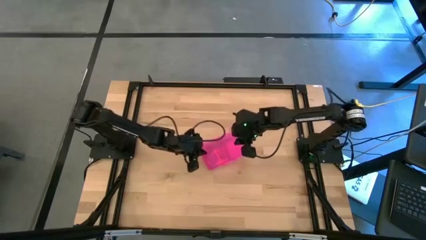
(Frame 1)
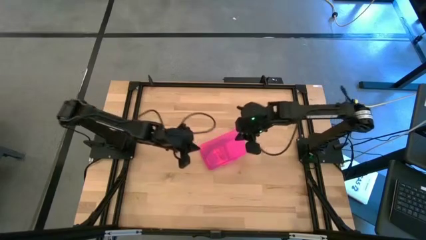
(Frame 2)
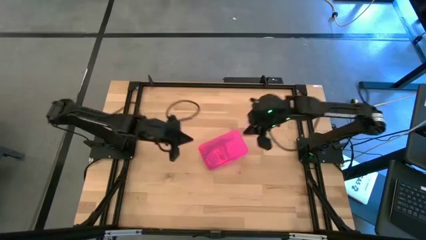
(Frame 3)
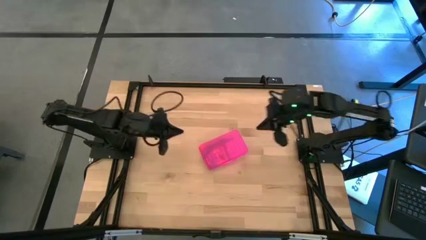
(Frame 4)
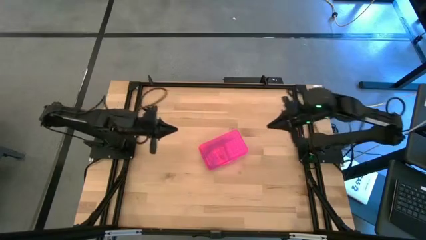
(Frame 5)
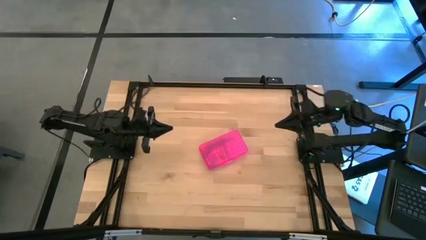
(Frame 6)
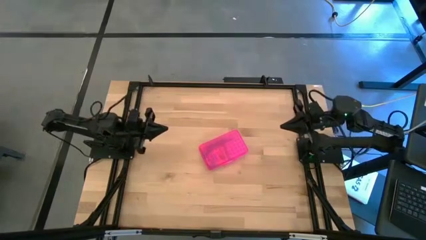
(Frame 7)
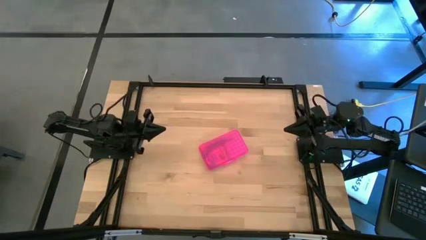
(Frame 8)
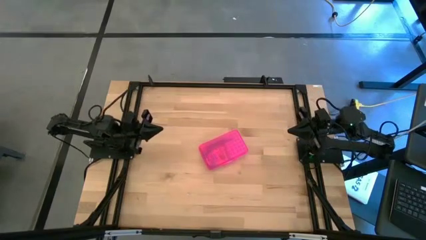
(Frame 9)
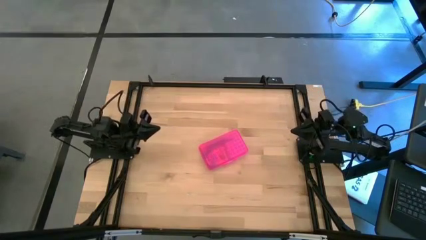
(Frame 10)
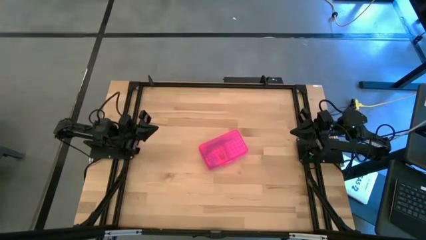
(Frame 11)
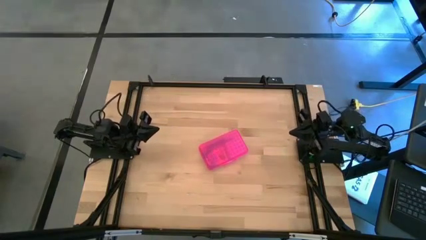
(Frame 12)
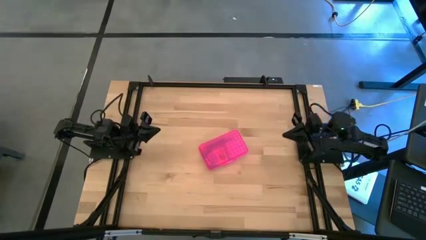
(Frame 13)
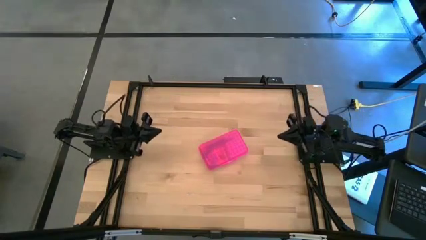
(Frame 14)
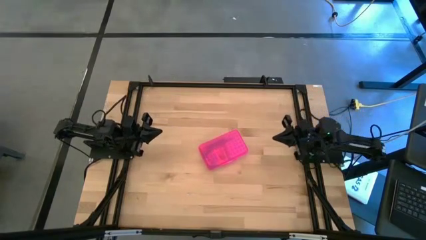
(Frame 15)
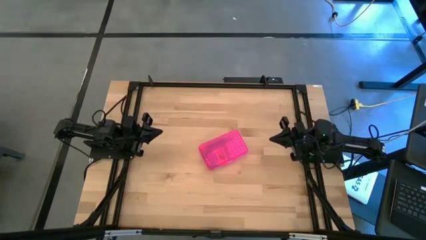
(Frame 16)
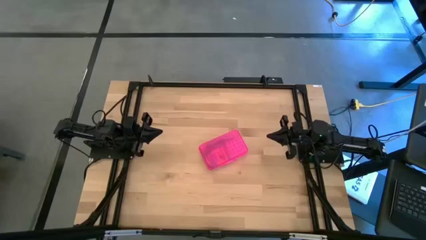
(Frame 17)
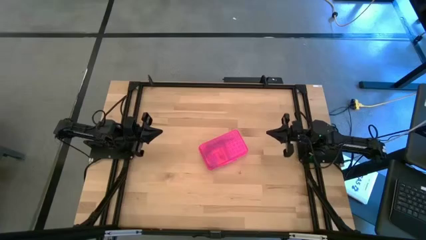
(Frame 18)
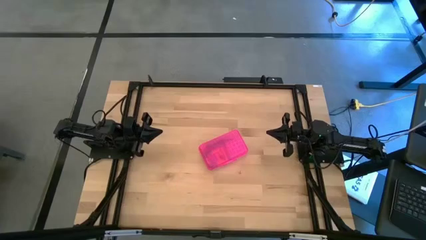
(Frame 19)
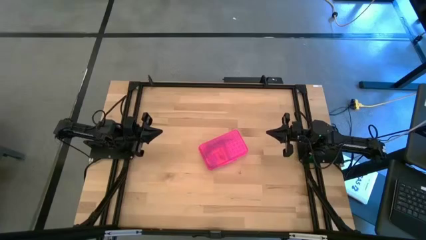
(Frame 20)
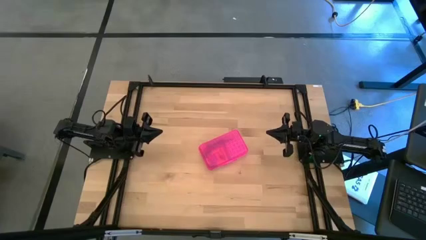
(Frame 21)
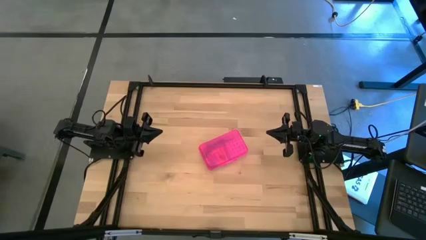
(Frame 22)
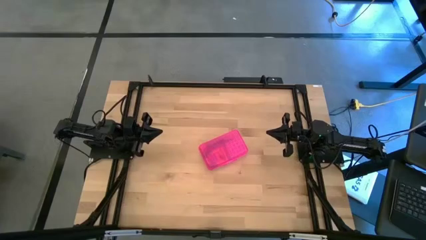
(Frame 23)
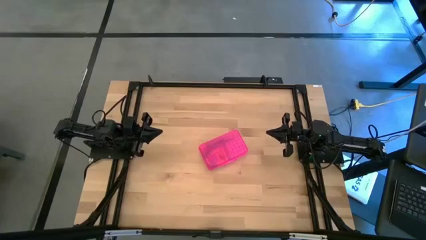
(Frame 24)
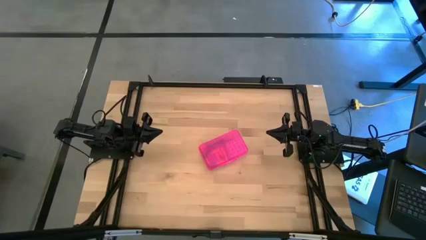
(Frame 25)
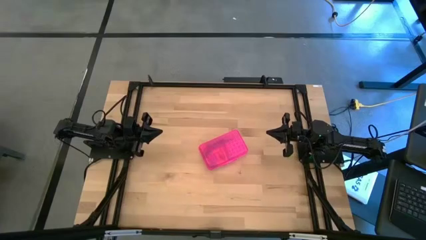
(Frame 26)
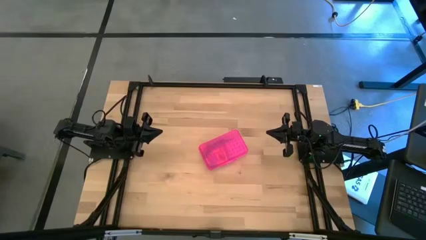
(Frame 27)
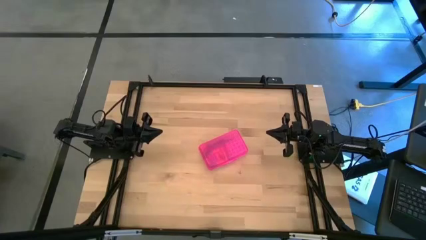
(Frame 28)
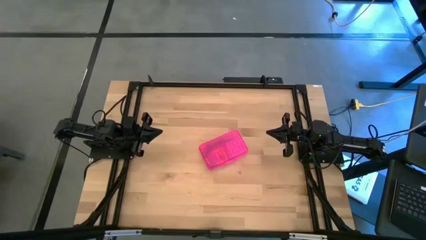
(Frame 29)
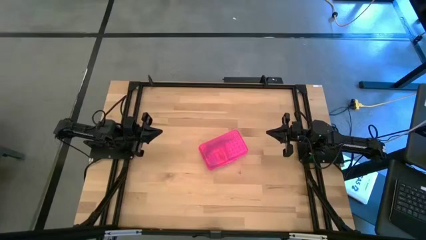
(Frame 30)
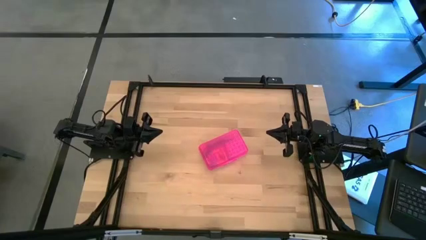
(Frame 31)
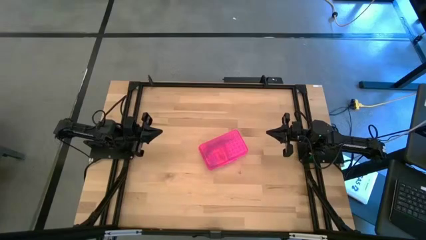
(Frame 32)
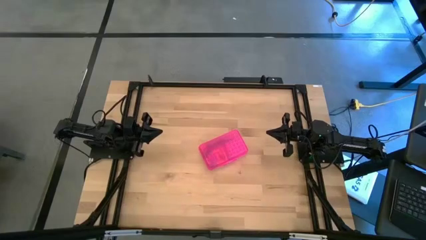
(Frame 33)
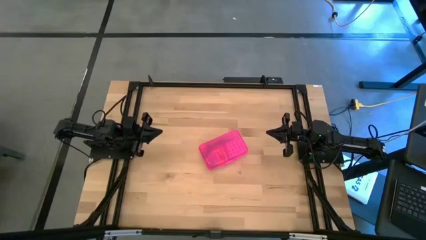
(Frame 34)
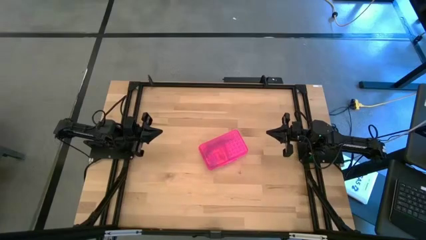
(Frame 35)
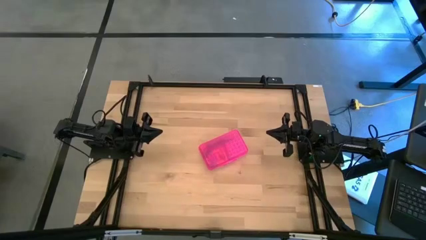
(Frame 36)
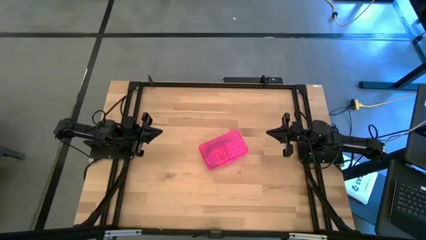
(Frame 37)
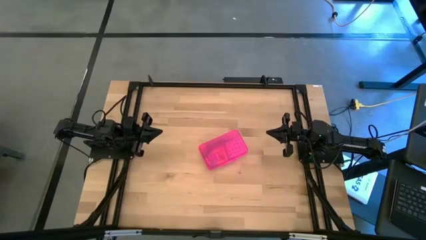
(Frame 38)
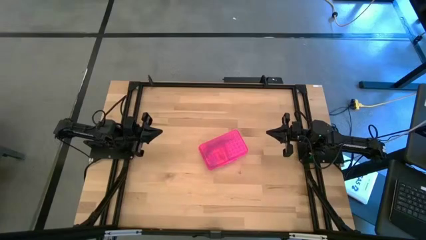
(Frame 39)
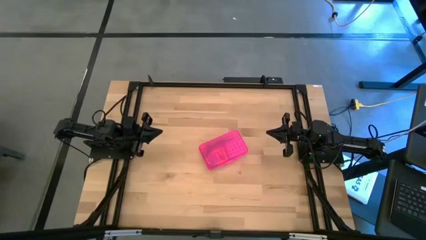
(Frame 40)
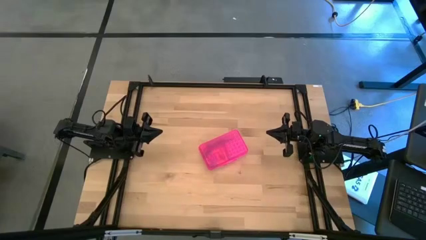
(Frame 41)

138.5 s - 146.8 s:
Task: Pack school essentials
Return to Home Position

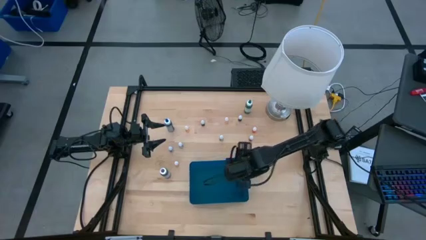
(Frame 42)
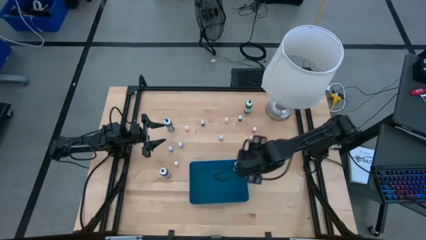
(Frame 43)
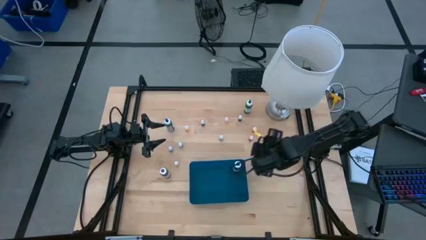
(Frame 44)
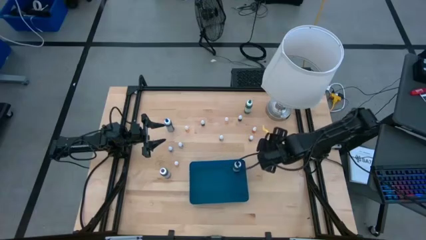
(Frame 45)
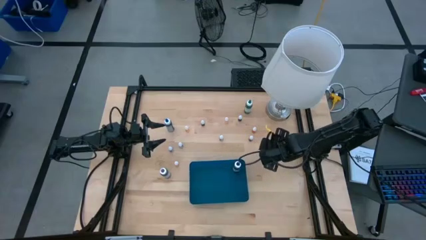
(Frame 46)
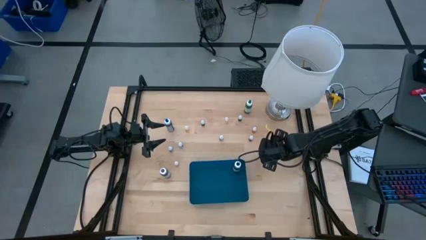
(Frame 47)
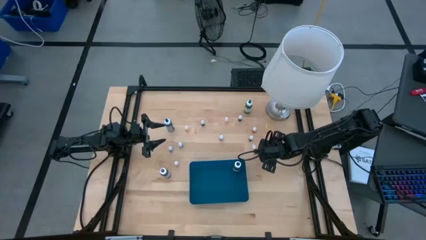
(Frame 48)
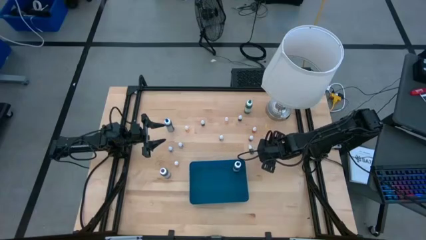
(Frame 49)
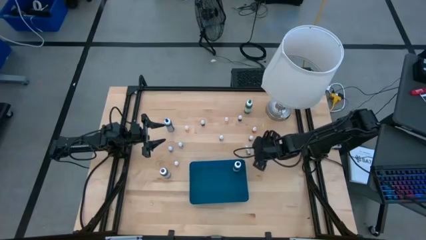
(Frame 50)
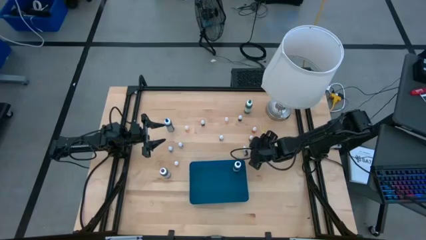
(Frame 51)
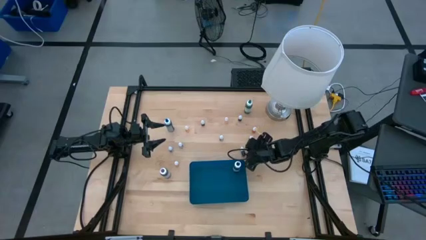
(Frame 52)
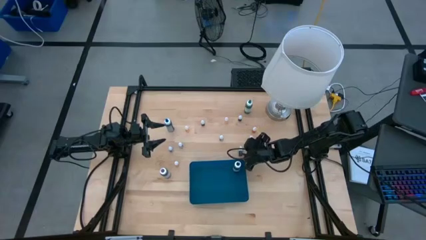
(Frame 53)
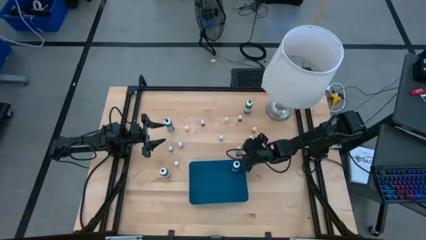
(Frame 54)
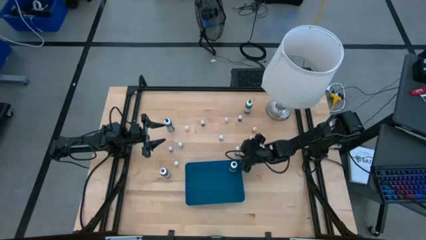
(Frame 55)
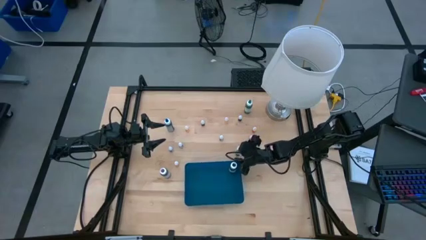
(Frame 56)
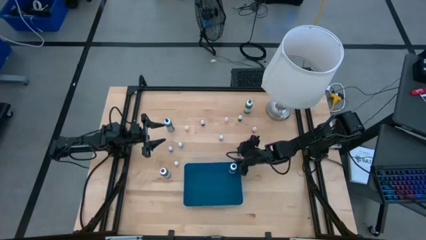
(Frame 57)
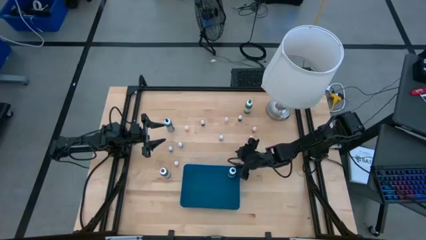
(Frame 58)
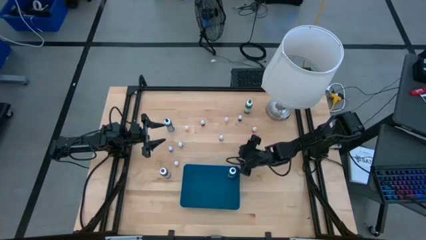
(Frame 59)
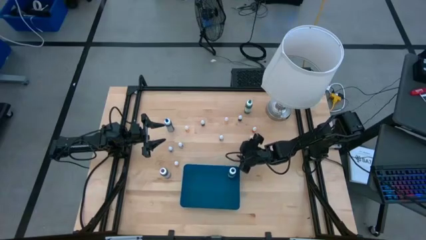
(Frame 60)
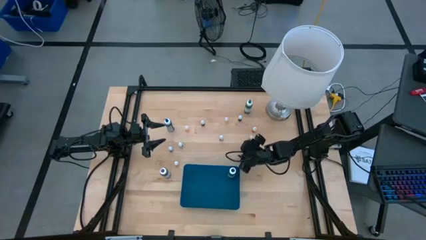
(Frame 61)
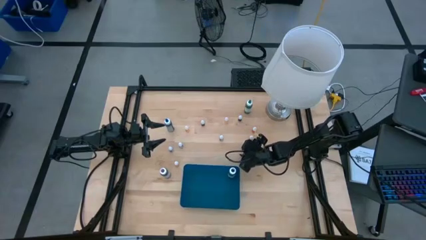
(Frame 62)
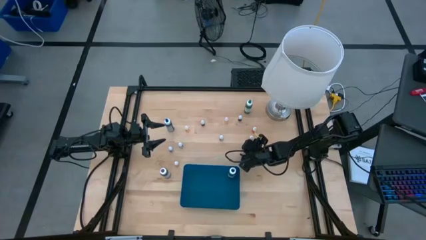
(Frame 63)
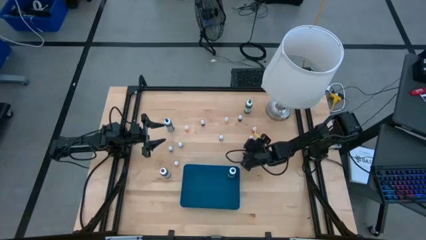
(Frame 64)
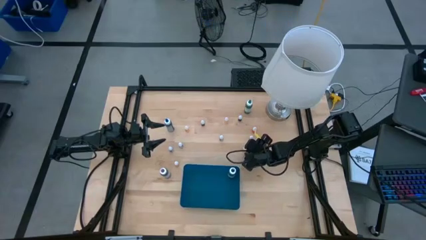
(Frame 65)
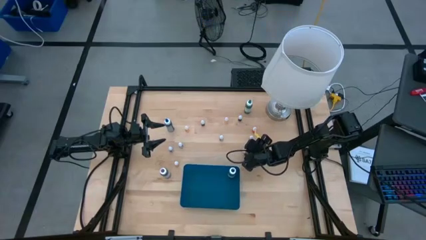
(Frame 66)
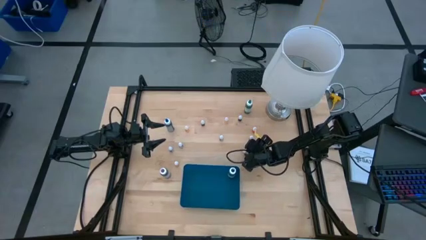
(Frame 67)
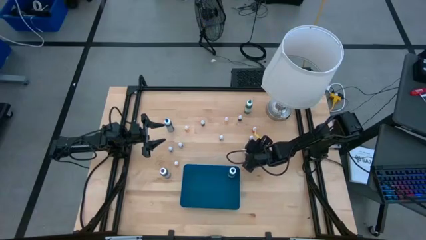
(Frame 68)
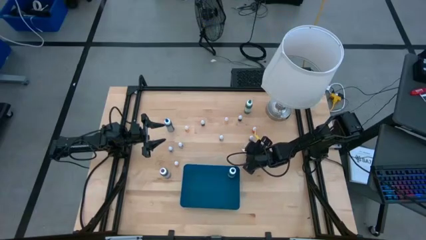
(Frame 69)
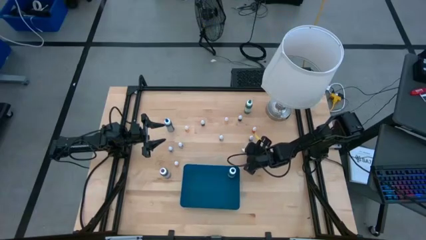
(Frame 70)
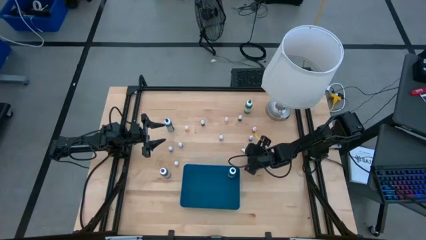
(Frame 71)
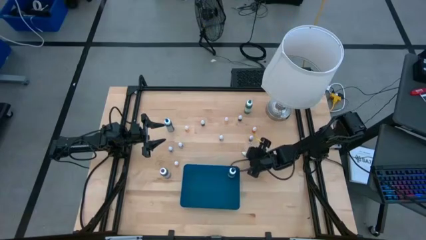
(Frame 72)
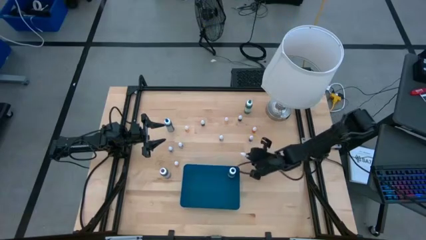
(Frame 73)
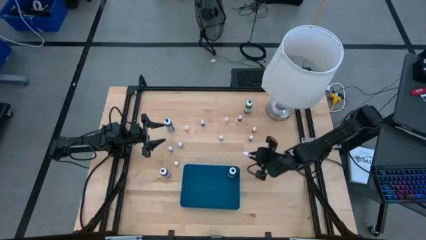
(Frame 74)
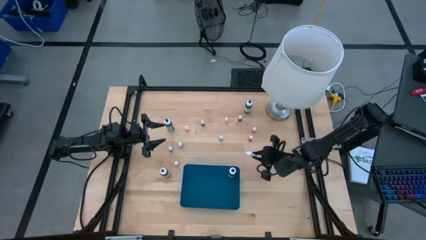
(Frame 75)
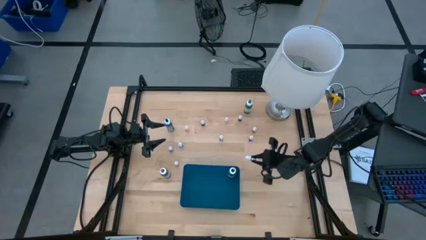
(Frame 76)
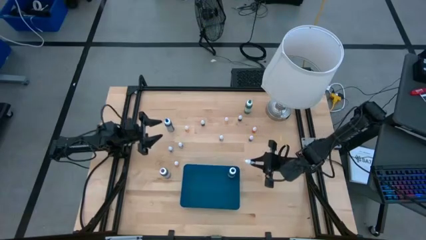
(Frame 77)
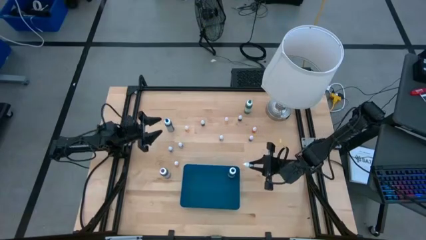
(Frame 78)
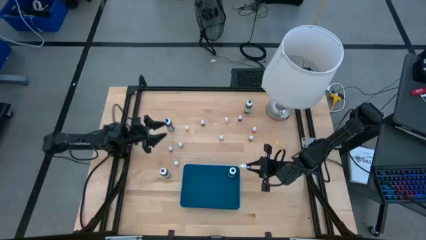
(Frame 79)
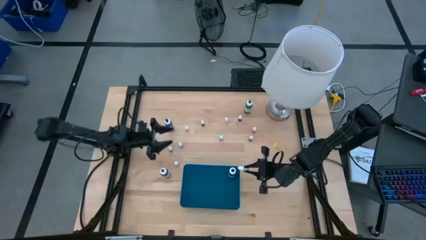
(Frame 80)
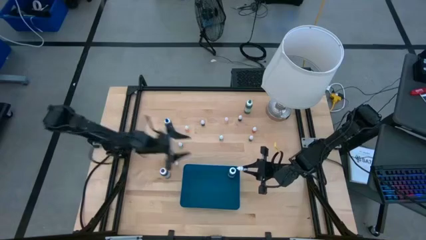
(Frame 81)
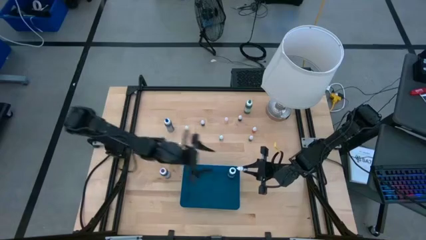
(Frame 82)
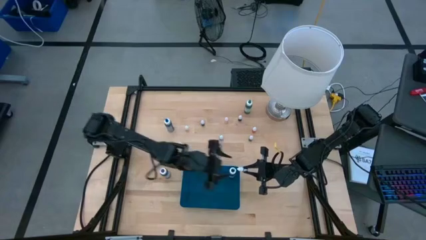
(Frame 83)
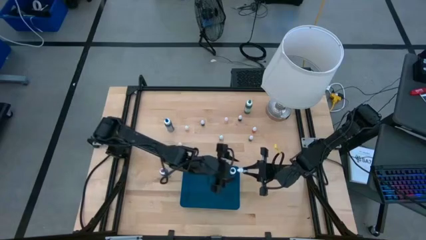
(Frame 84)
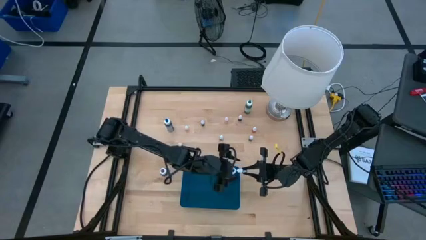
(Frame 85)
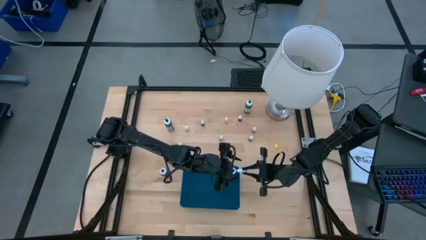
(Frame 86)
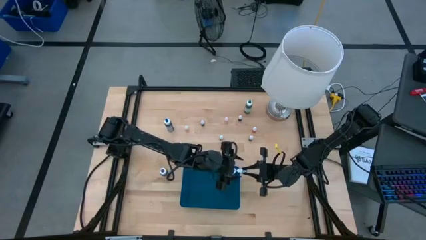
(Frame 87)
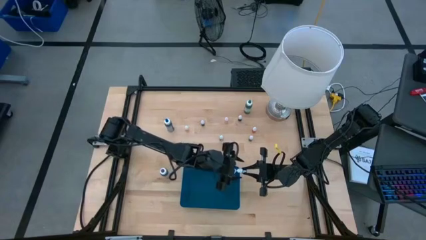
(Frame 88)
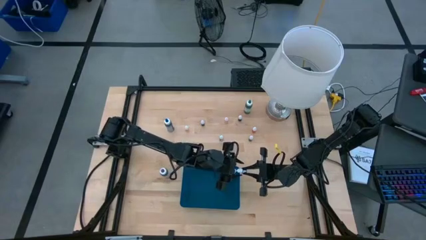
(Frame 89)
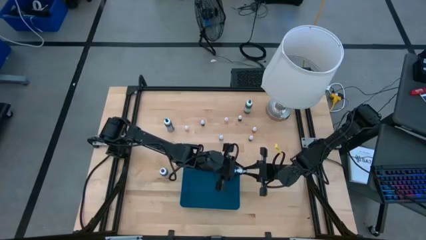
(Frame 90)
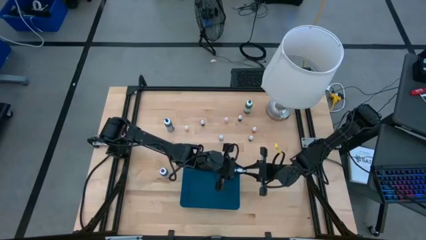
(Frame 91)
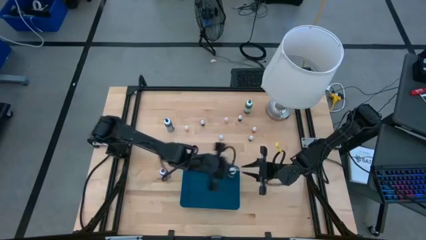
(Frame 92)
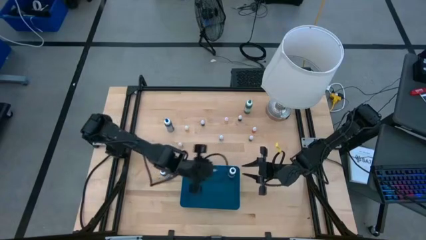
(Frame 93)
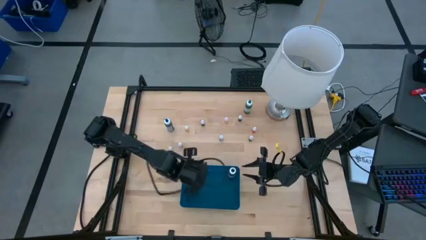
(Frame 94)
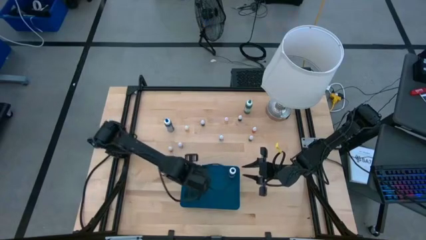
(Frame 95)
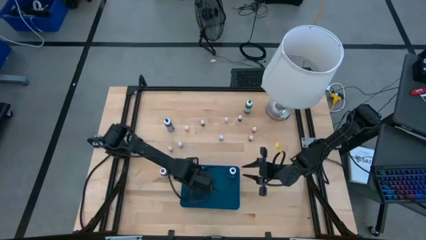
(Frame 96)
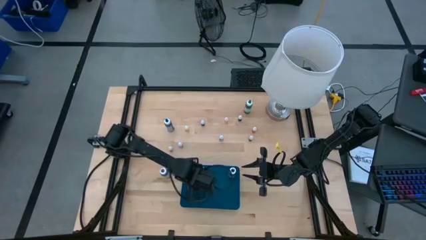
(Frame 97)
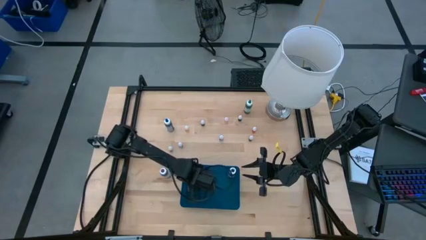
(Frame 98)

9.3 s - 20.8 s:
Task: Pick & Place food coloring
Put the green food coloring bottle into the blue container
